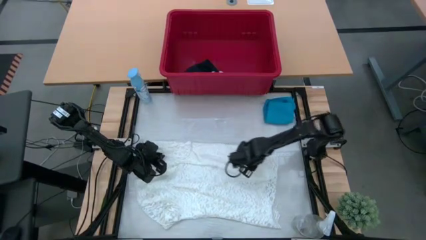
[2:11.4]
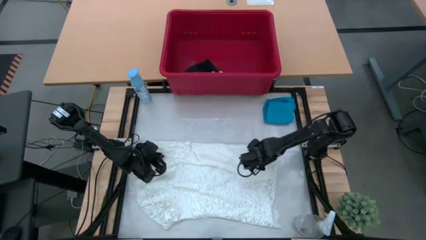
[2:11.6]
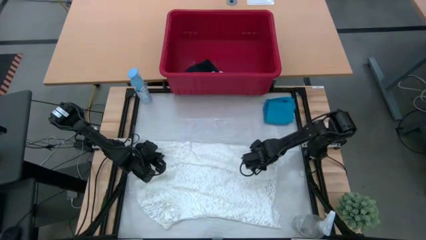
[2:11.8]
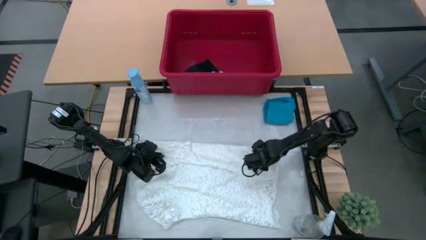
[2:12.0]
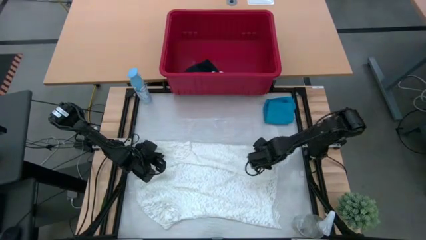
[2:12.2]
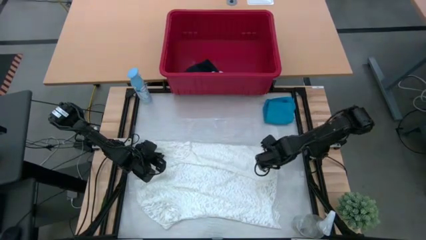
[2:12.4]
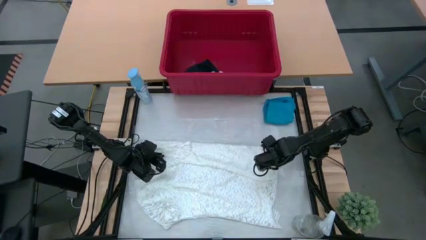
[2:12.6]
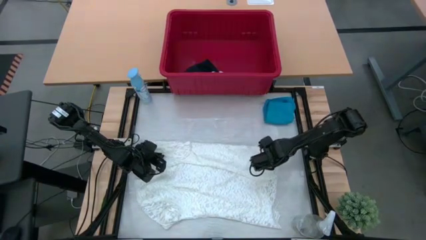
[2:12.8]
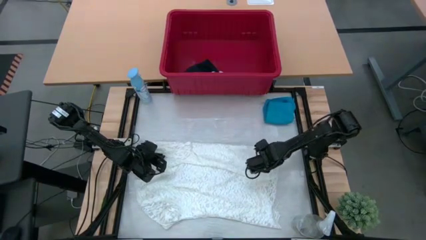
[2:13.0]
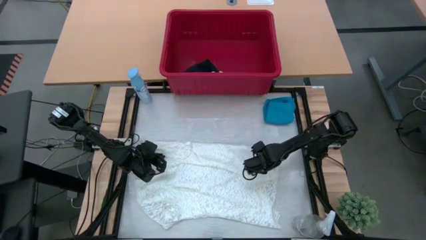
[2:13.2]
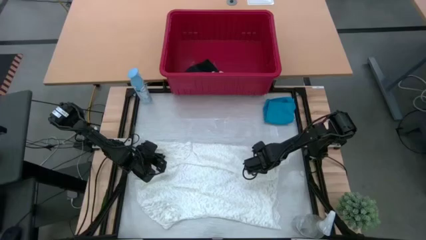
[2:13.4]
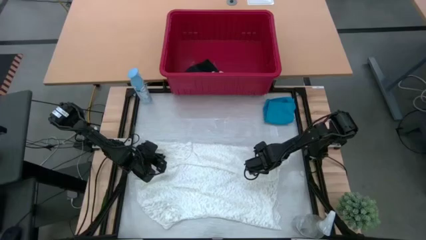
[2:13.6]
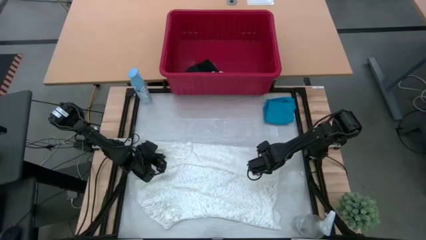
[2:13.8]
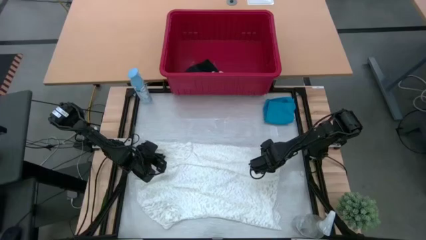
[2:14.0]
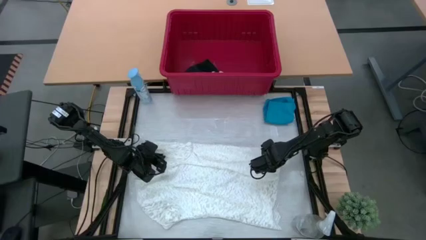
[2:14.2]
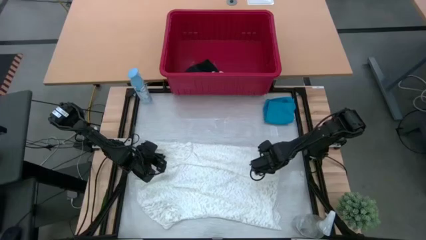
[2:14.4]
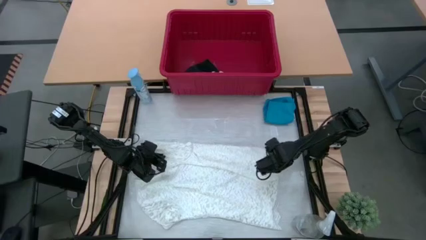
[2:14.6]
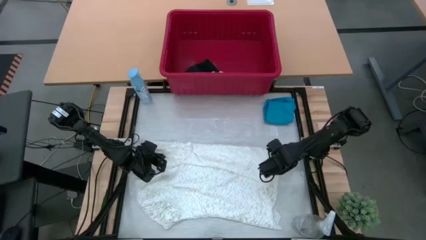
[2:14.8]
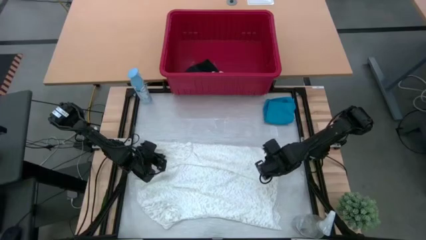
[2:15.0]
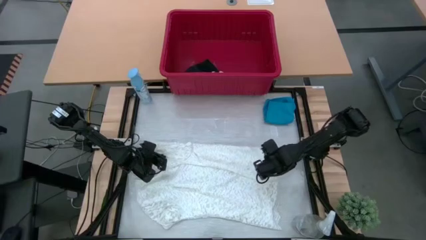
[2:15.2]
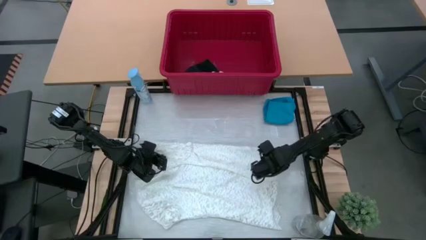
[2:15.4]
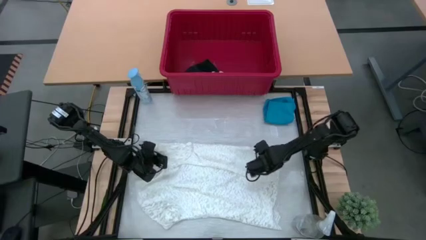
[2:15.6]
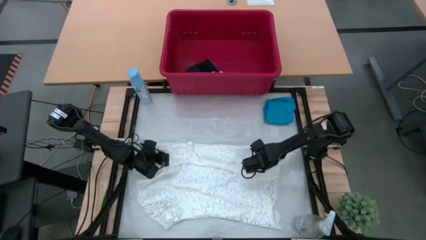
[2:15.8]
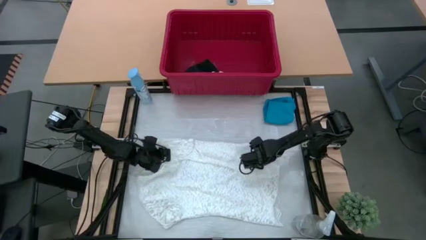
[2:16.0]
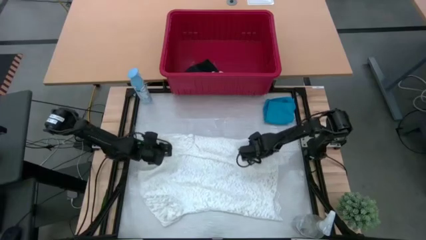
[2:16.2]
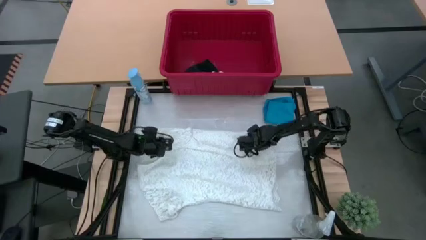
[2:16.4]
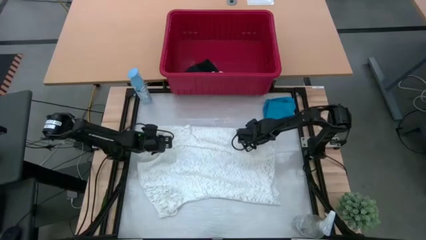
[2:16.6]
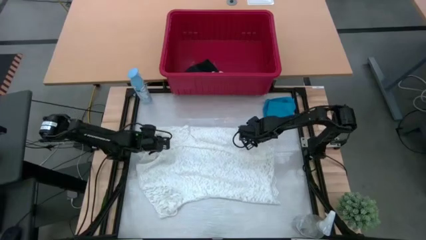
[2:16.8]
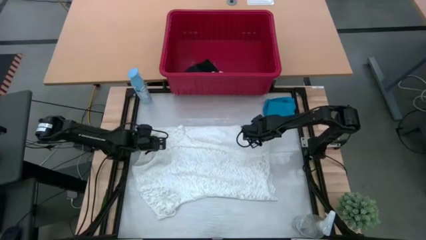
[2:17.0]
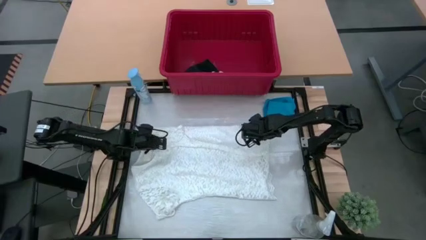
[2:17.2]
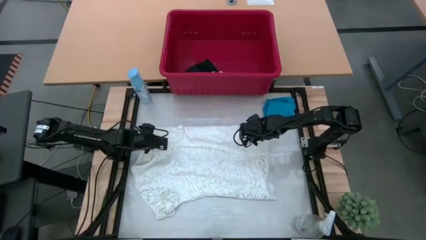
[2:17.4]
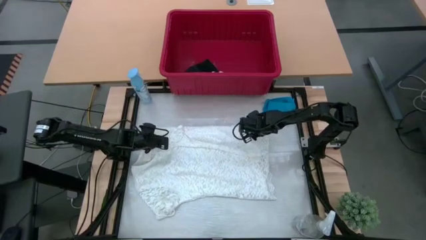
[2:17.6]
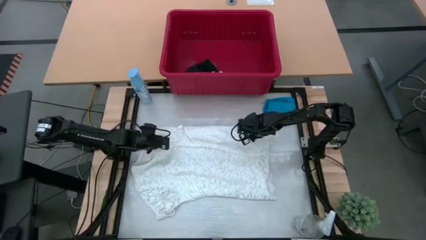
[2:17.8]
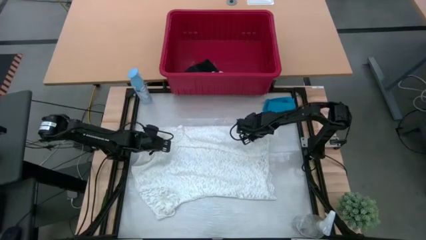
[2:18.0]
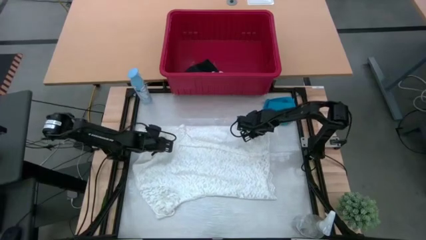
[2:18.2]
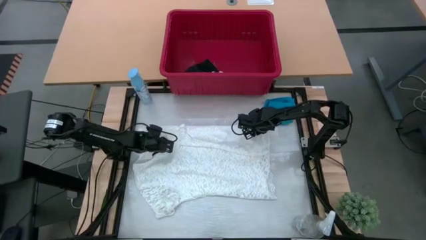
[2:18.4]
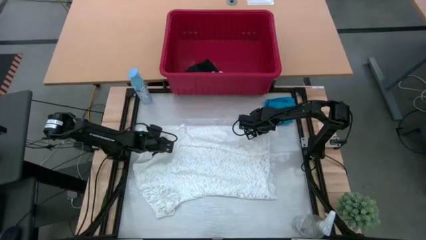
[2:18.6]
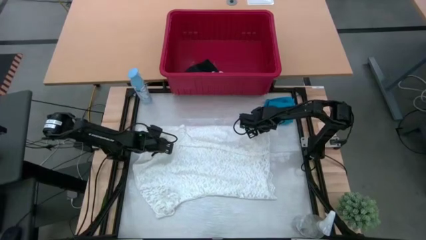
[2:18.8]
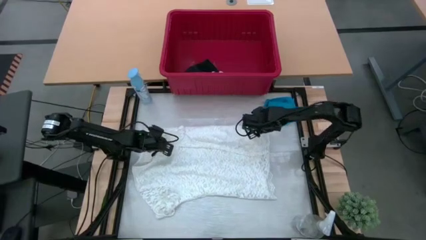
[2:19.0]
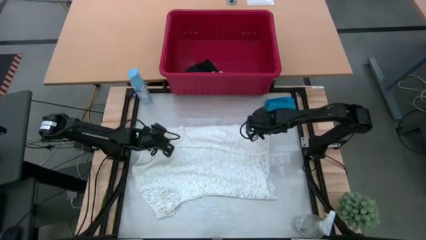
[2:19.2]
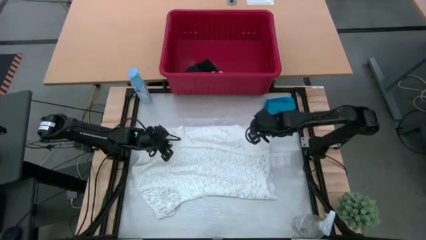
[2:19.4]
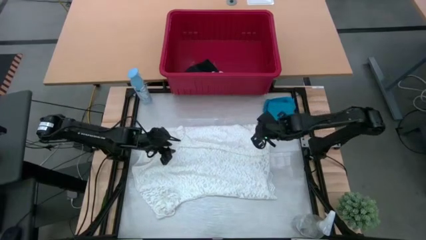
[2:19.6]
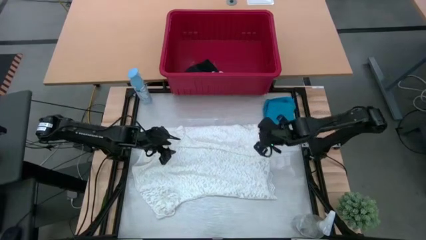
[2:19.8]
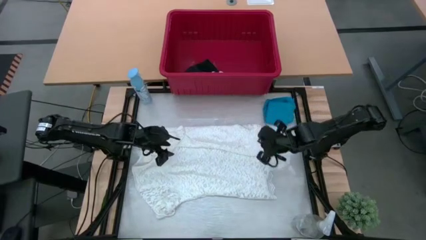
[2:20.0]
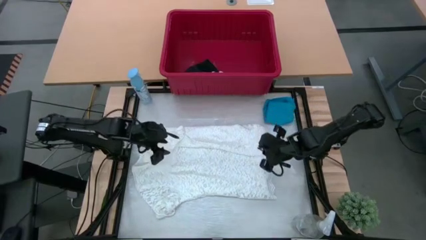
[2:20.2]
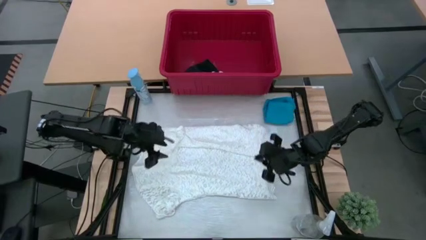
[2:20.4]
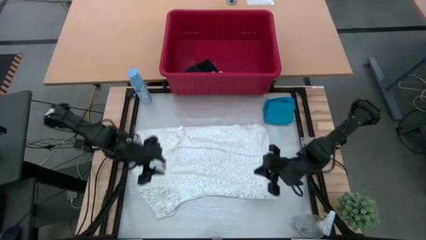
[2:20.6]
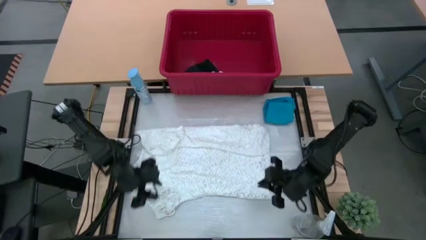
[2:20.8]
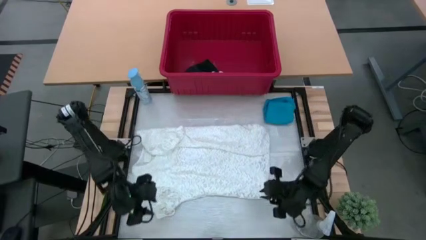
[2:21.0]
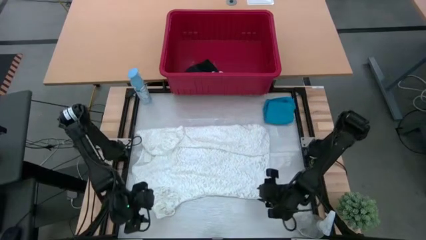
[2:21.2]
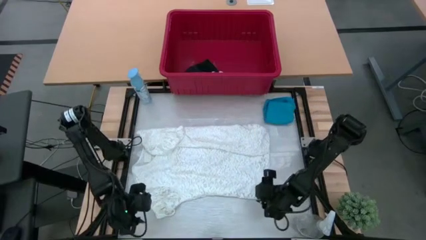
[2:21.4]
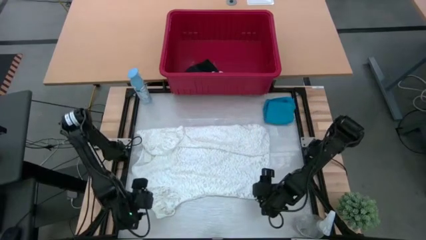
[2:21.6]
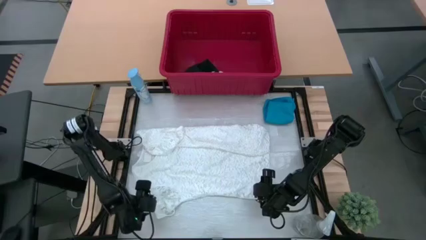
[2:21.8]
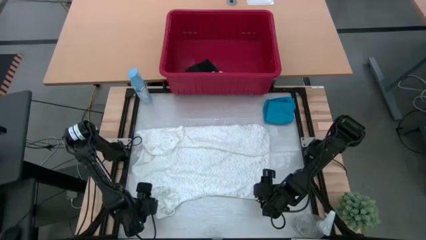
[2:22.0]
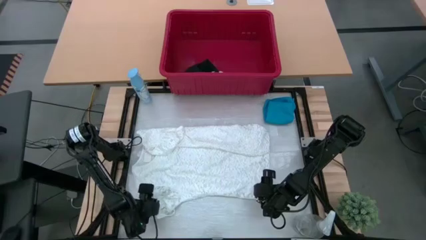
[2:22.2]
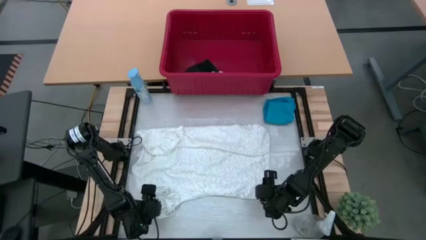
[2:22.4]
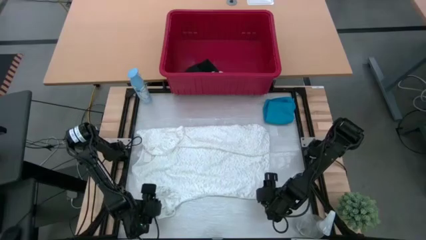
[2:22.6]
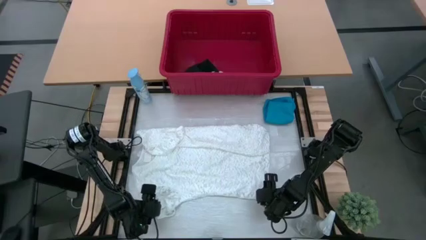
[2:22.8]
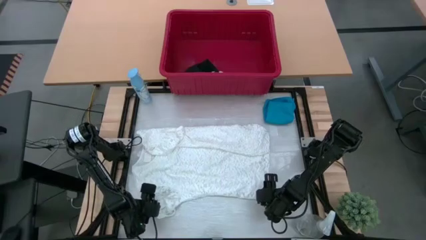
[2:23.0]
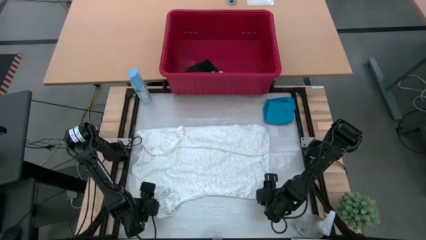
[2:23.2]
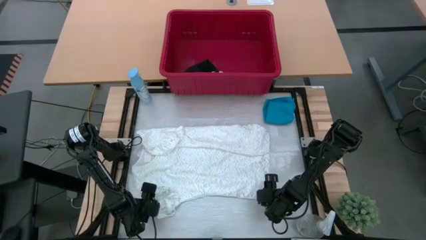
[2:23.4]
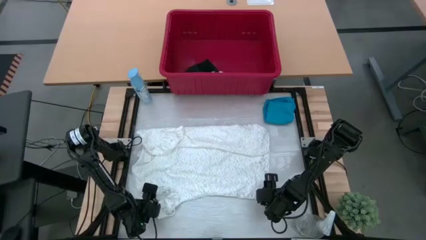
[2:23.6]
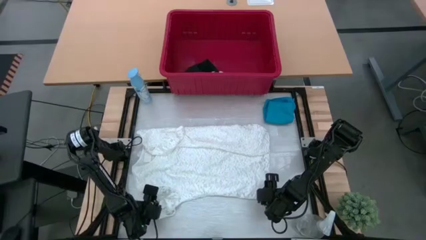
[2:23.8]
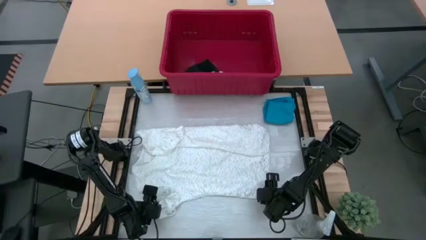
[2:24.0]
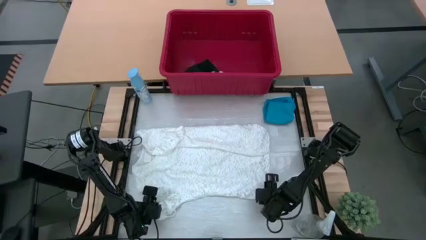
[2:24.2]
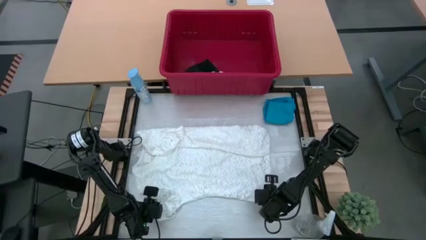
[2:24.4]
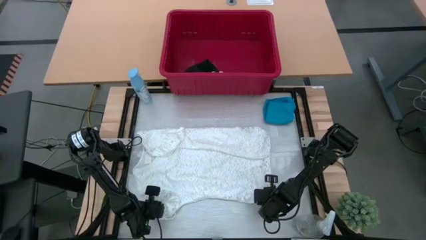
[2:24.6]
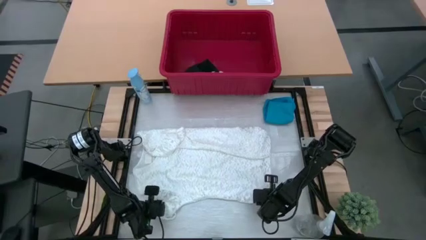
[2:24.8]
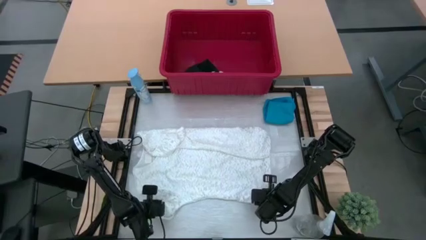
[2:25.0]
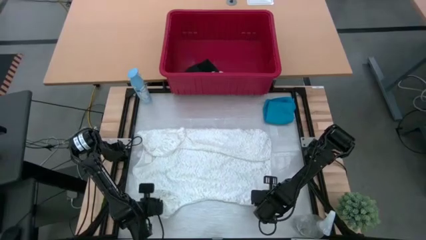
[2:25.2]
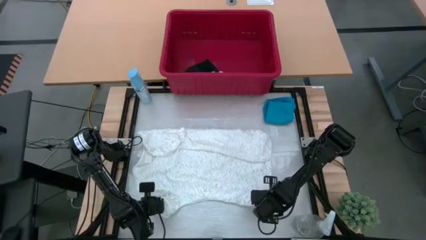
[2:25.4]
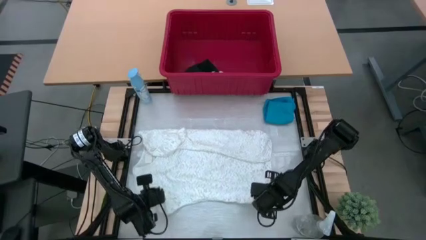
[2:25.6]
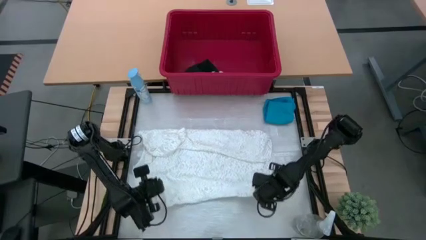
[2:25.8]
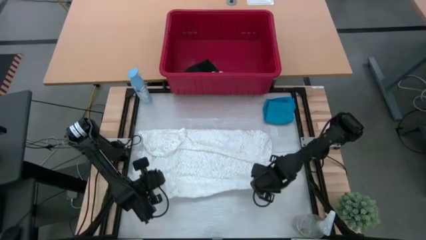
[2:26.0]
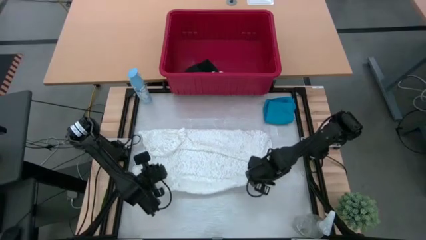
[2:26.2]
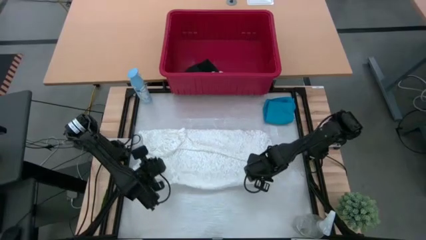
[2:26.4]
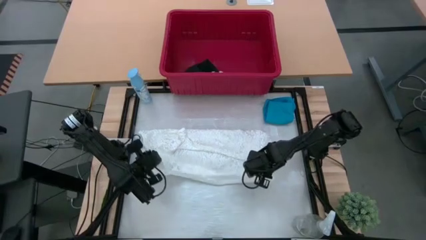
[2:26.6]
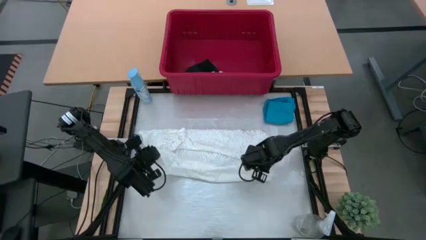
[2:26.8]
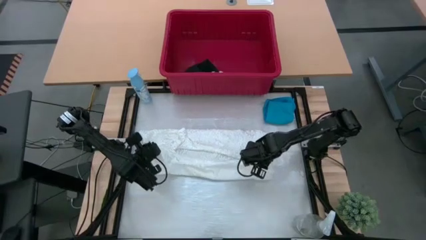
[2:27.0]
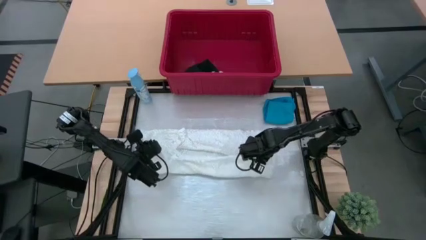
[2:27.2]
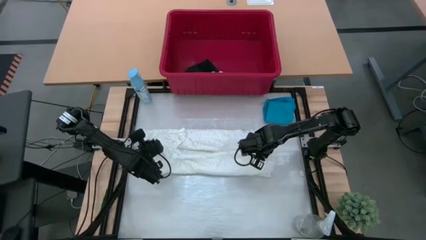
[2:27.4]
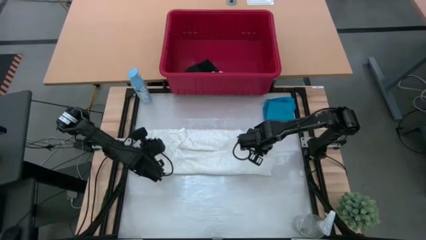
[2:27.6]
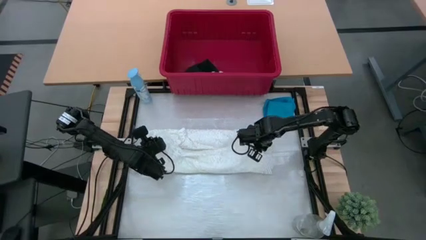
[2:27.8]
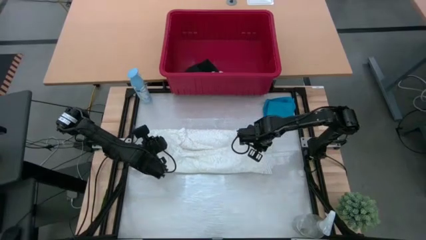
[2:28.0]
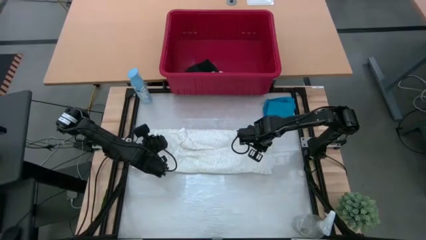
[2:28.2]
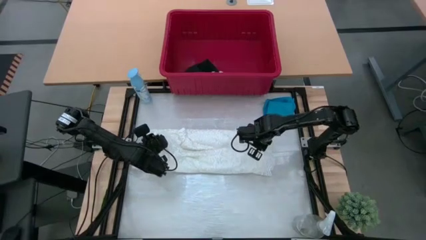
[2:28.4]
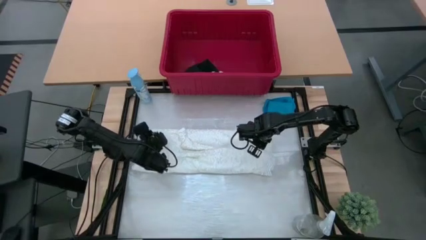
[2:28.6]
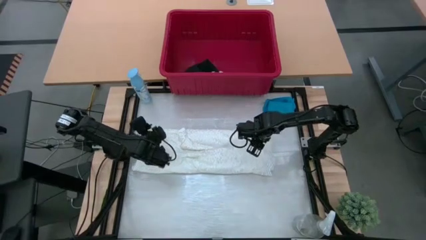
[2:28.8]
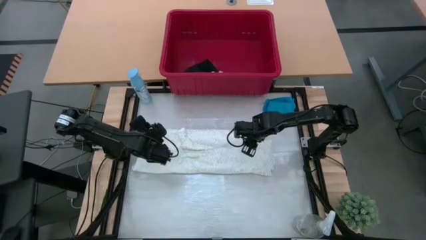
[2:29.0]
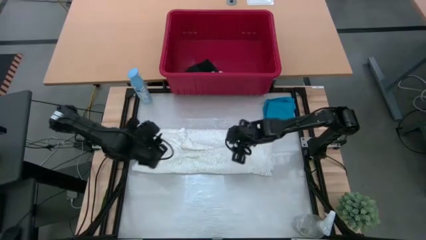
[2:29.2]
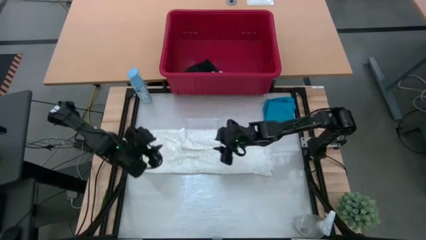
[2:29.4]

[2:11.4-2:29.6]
Task: Fold laundry
Fold the white blouse
